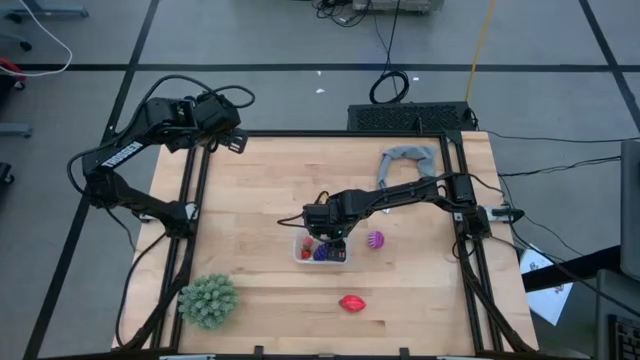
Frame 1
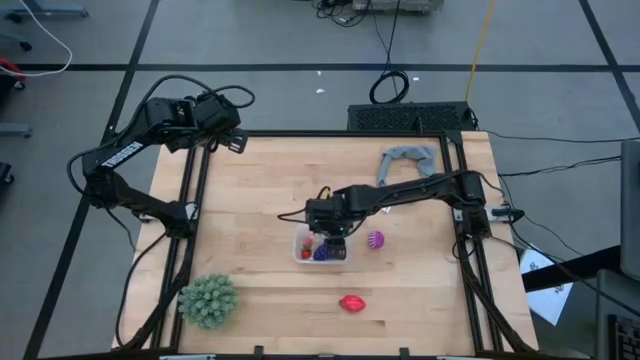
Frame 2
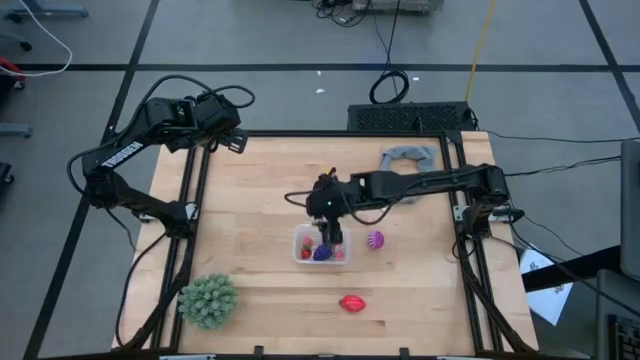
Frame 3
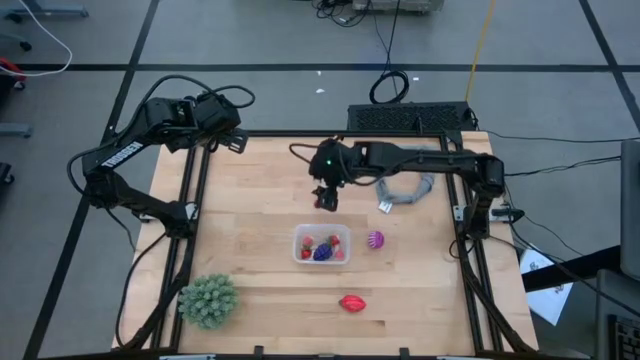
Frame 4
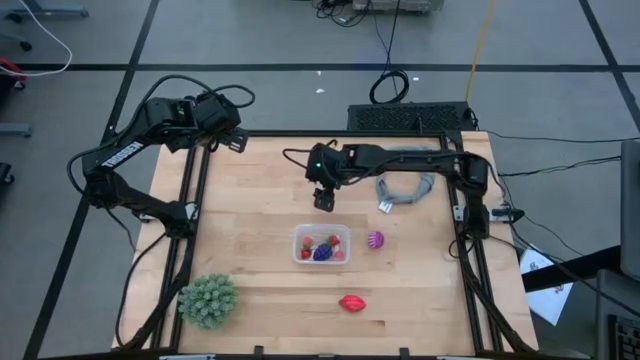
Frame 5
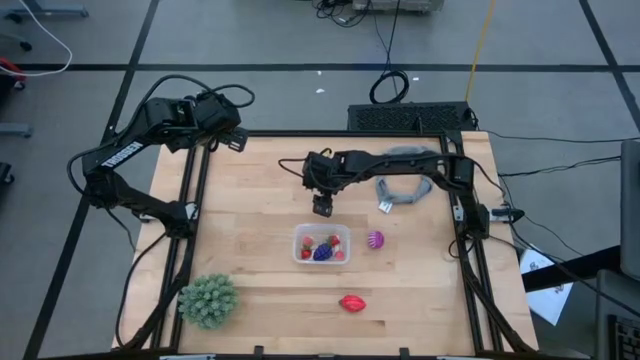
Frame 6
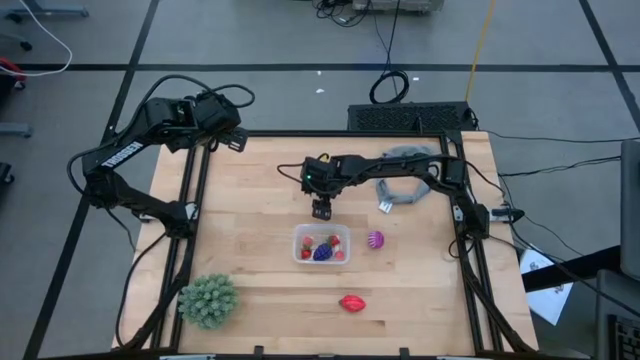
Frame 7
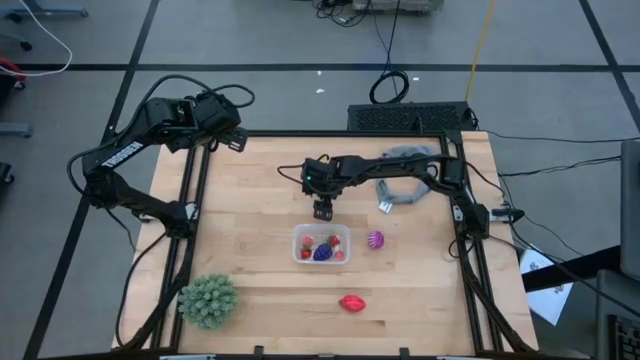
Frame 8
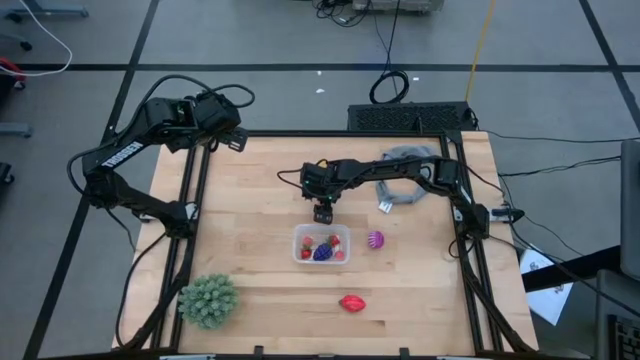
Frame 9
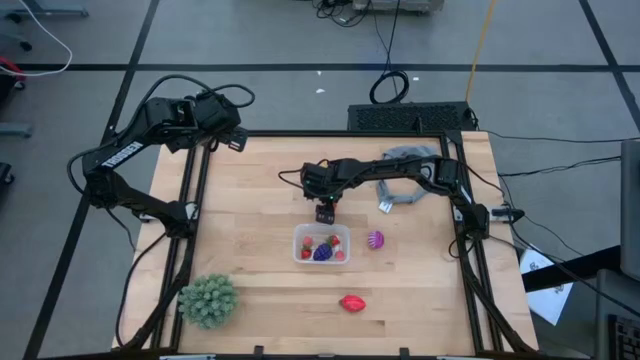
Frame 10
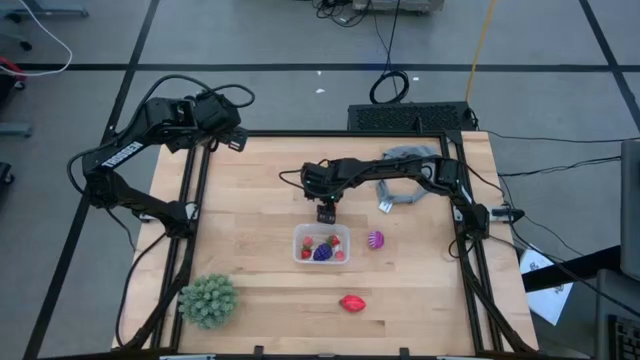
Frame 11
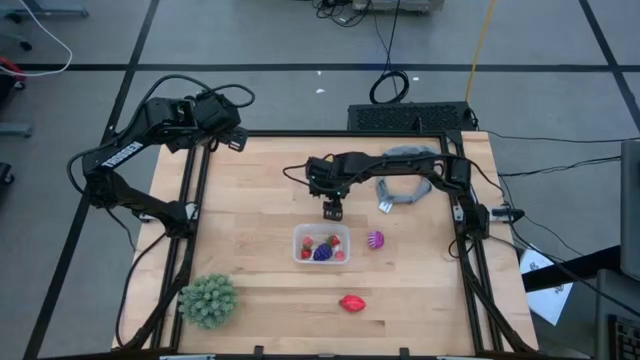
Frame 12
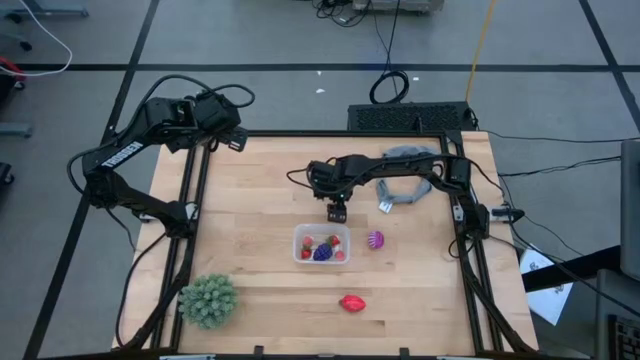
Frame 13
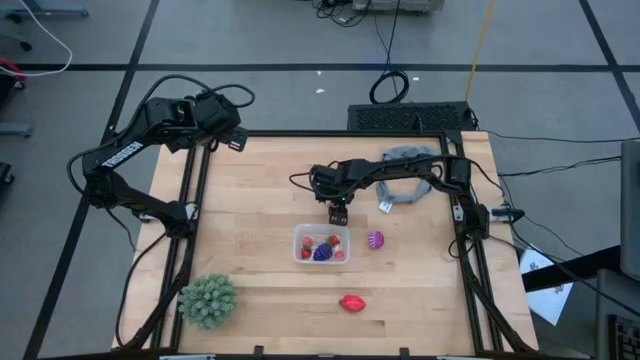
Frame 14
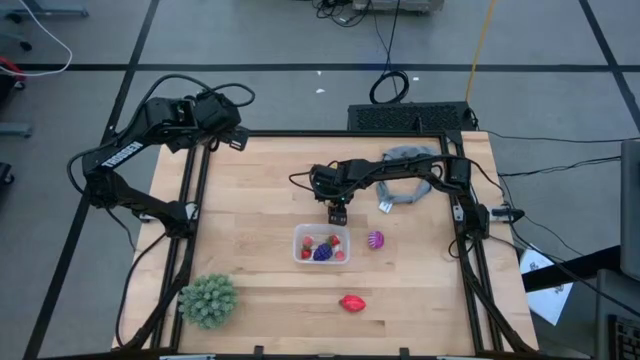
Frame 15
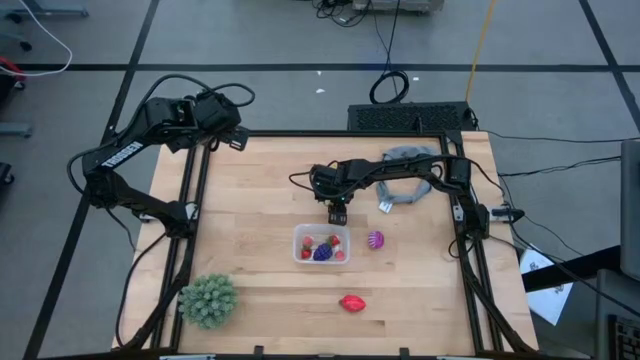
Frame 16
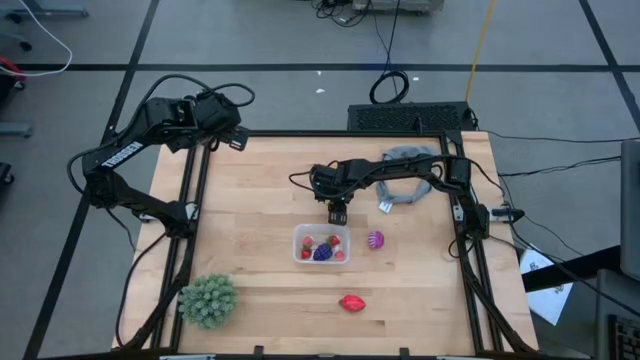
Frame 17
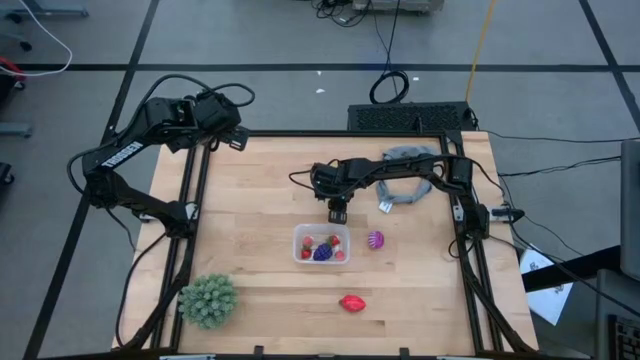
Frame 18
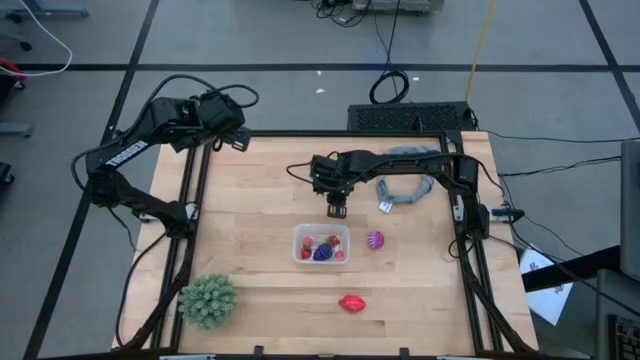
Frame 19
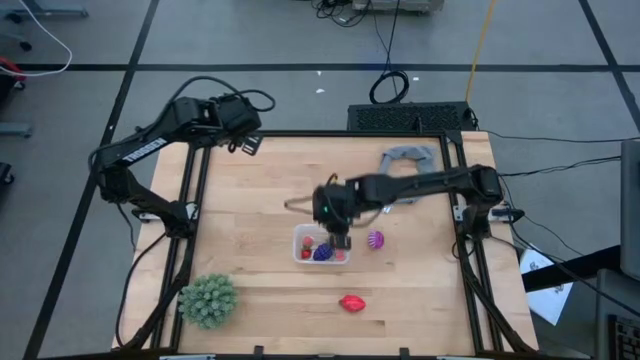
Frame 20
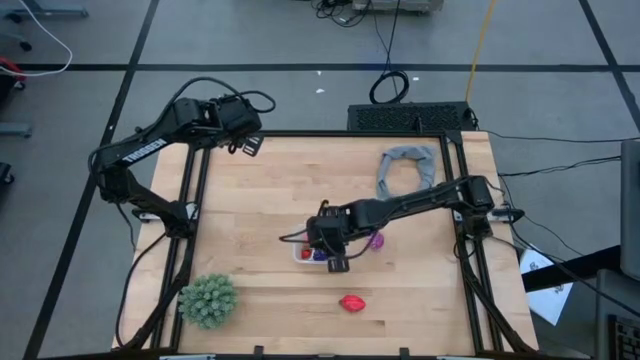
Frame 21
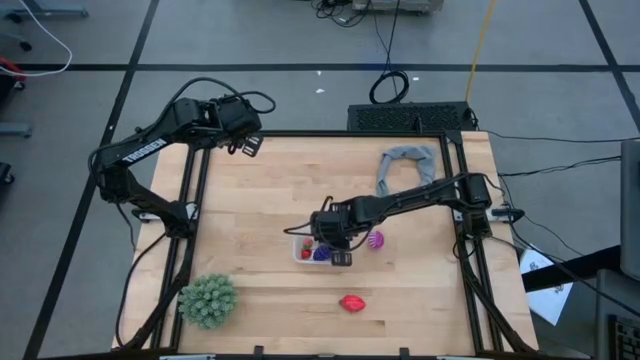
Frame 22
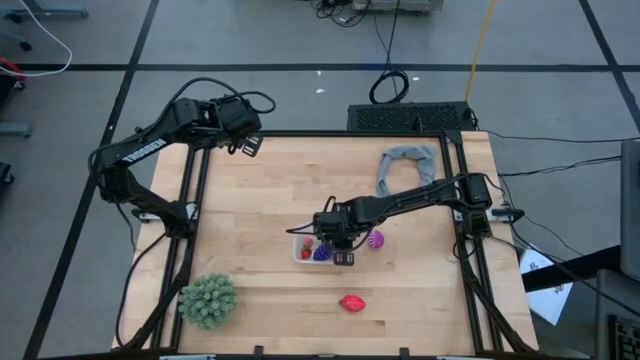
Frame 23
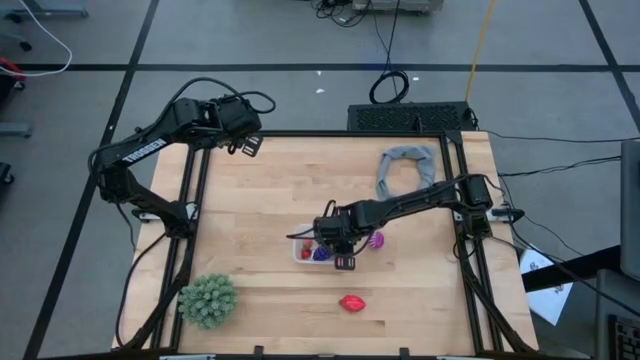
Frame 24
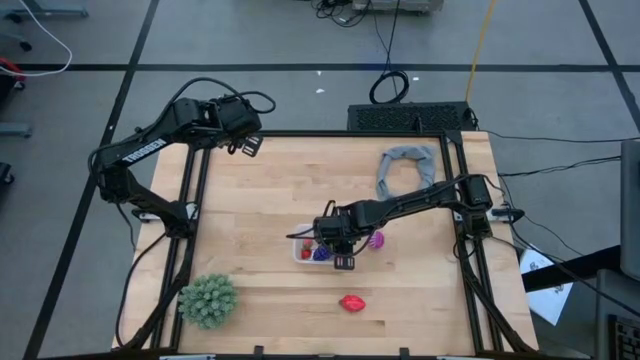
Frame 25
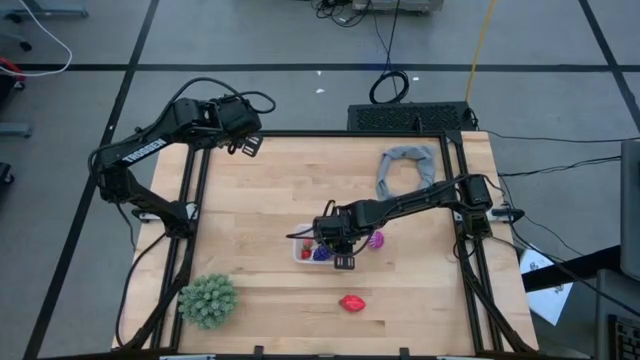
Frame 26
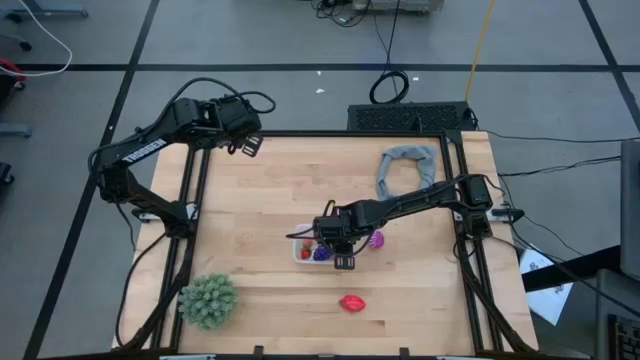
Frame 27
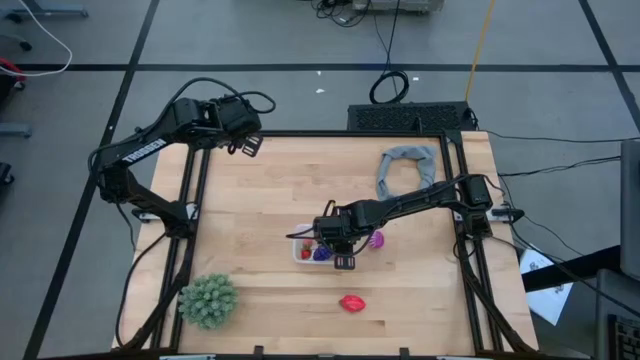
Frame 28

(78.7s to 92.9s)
Task: Pick and placing Produce into tupperware
Put the strawberry into the bin

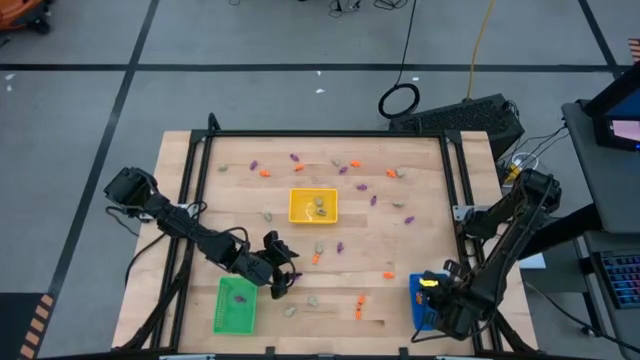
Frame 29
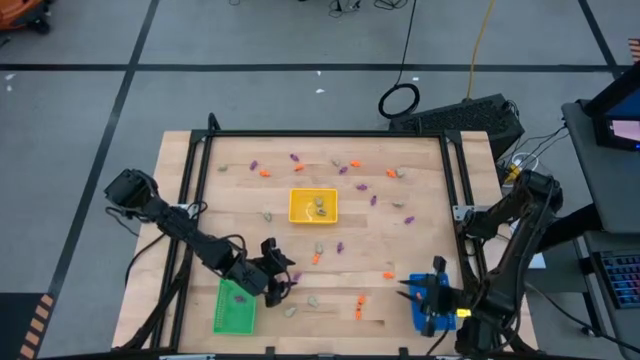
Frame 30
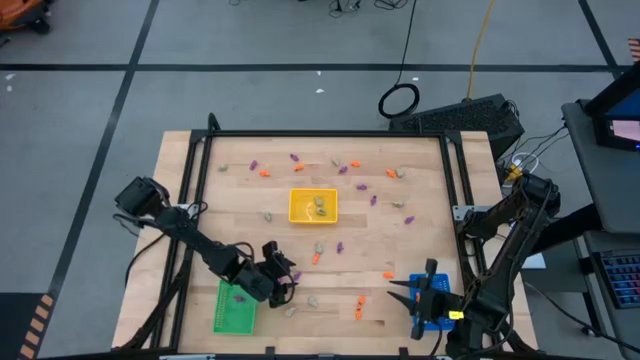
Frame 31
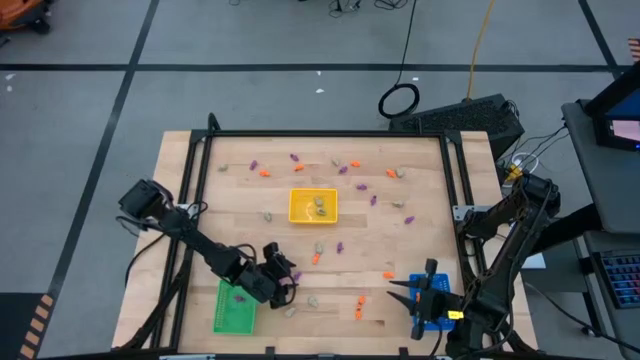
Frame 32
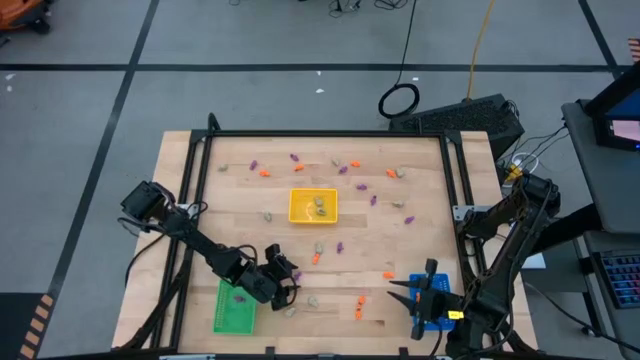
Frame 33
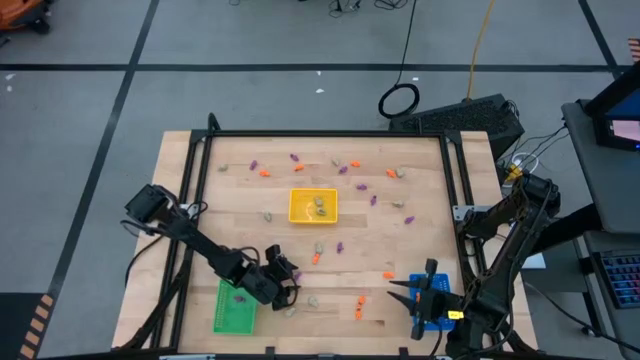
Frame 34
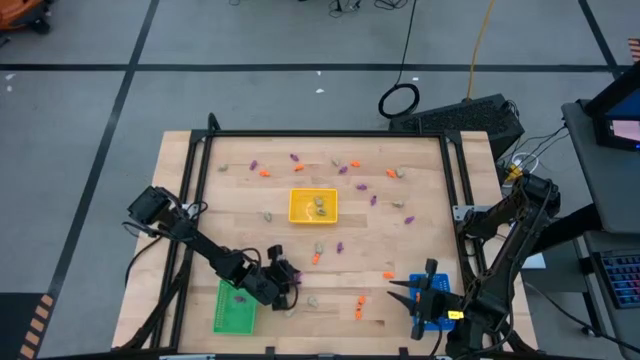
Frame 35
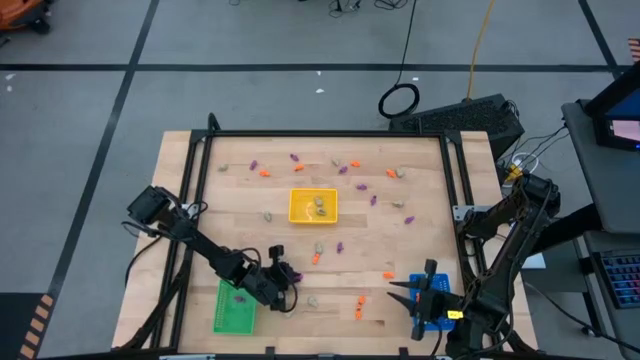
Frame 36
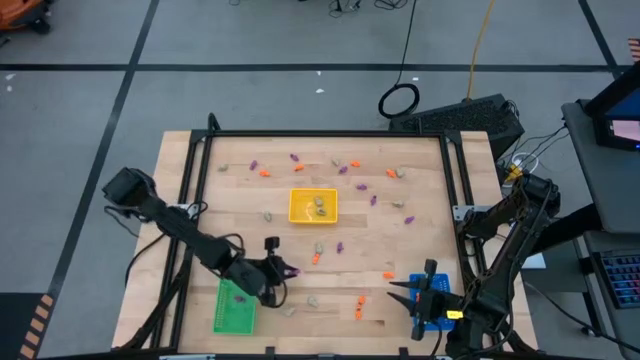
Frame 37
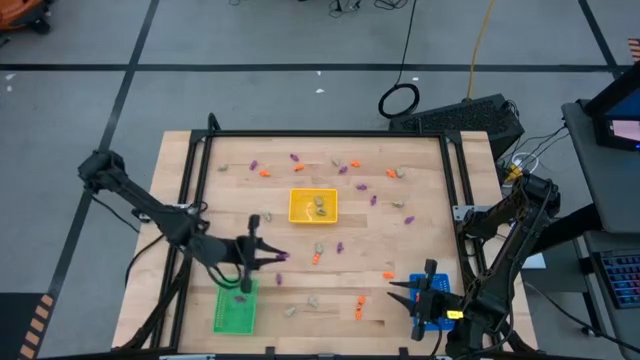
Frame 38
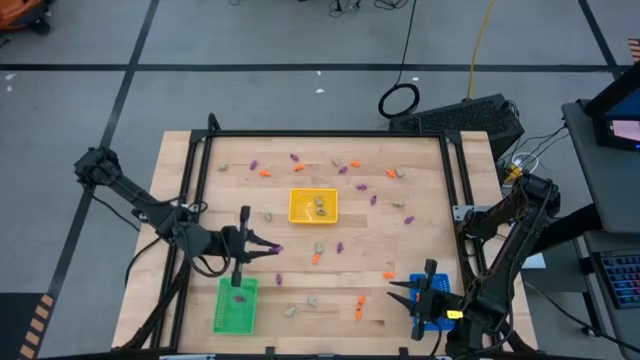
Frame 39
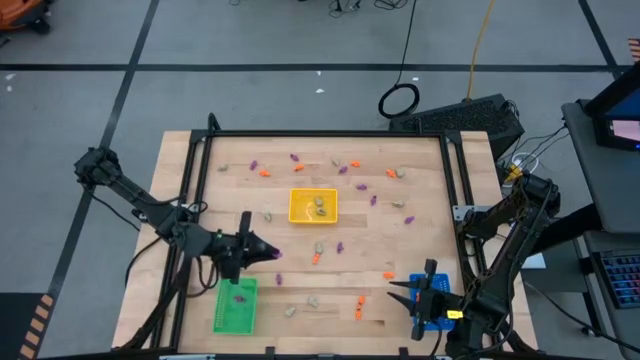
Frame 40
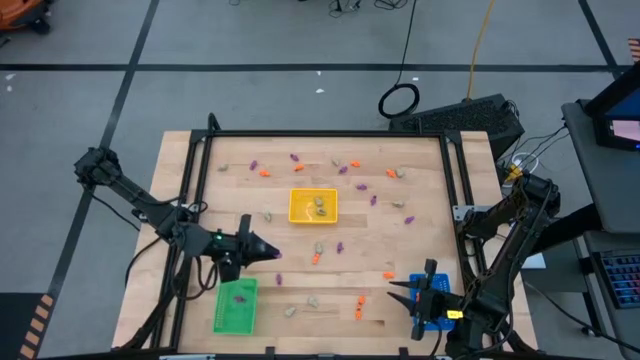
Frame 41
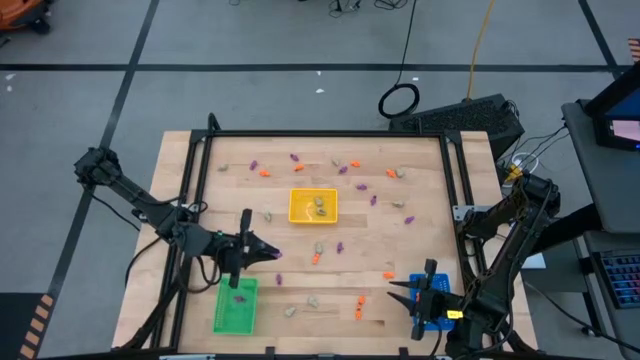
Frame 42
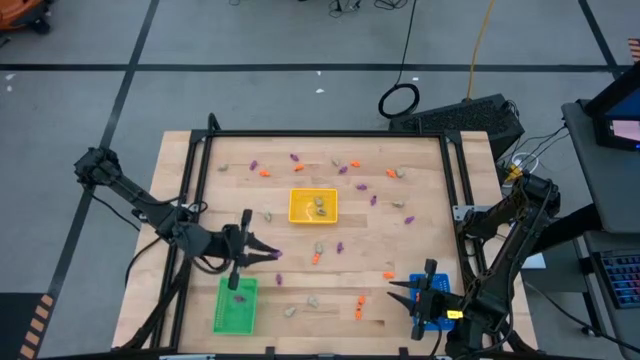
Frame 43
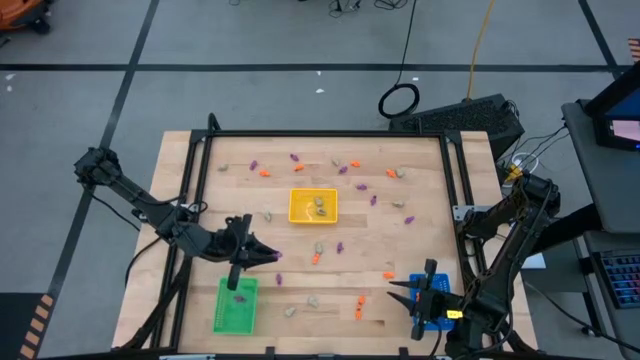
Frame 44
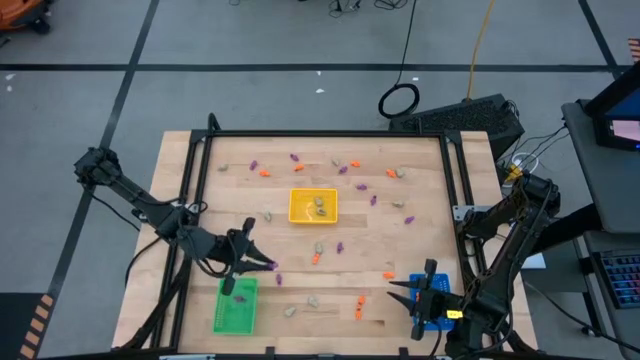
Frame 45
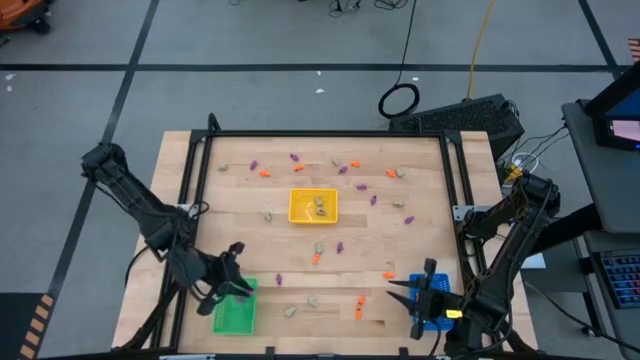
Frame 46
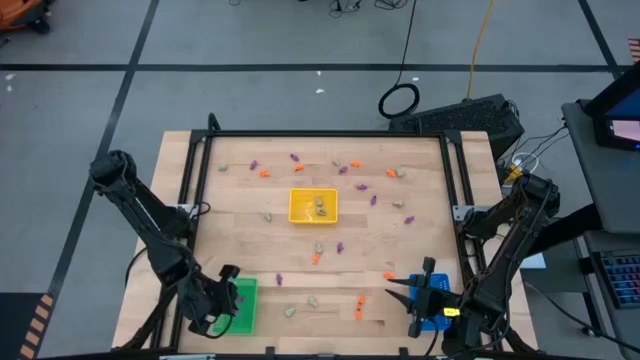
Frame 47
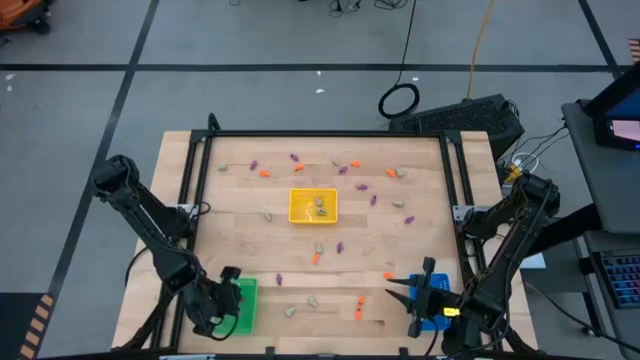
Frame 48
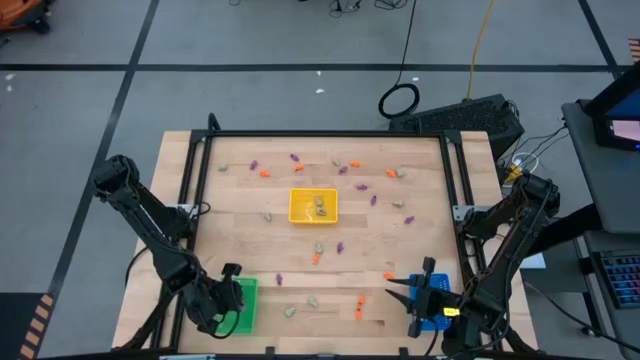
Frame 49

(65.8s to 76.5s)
Task: Sort Halloween decoration
Put the purple skeleton toy in the green basket
